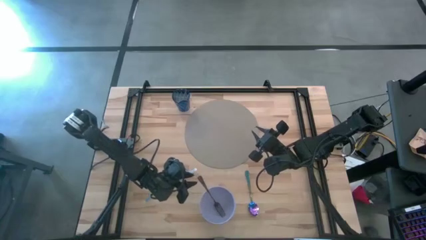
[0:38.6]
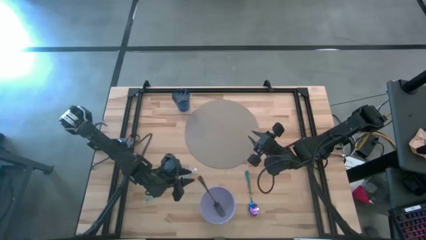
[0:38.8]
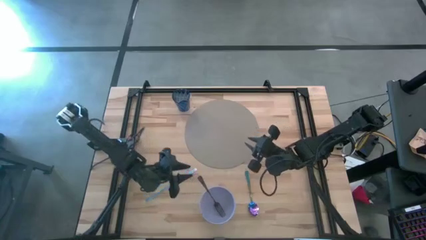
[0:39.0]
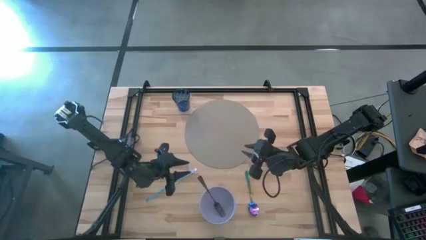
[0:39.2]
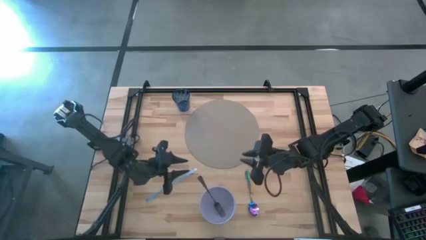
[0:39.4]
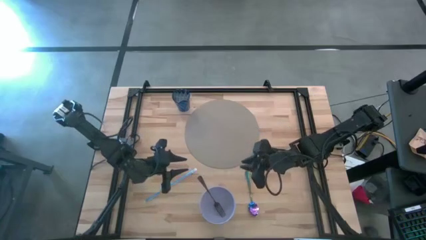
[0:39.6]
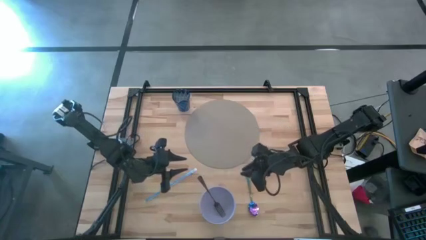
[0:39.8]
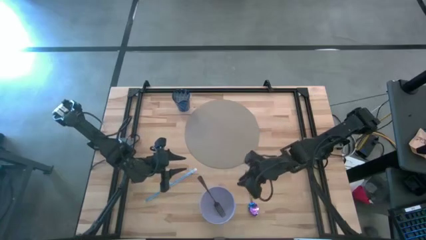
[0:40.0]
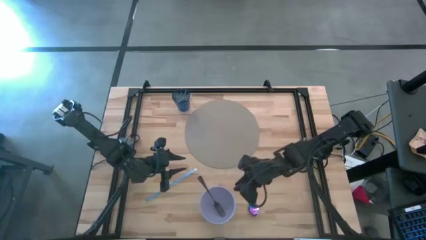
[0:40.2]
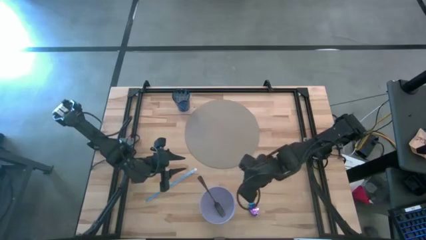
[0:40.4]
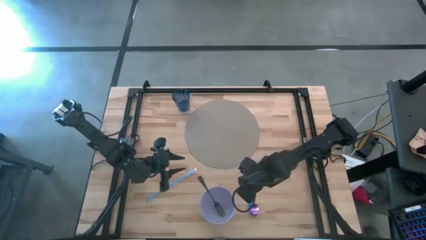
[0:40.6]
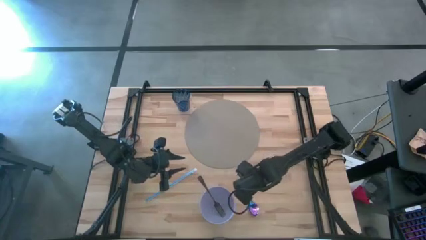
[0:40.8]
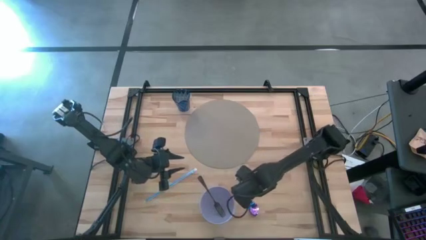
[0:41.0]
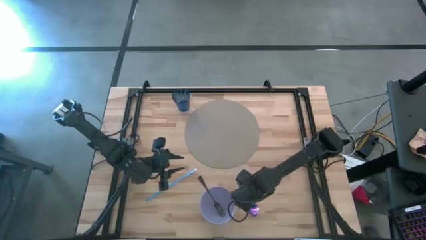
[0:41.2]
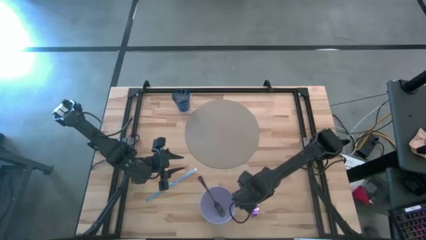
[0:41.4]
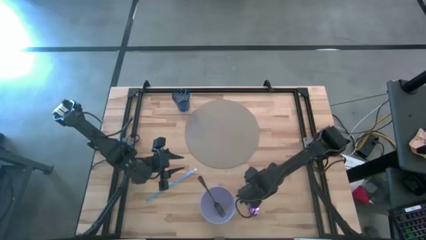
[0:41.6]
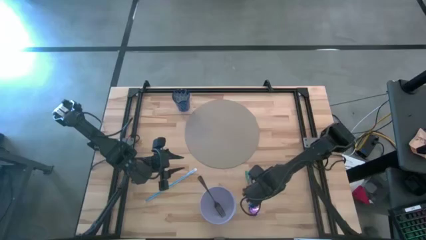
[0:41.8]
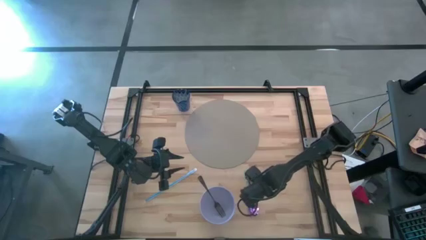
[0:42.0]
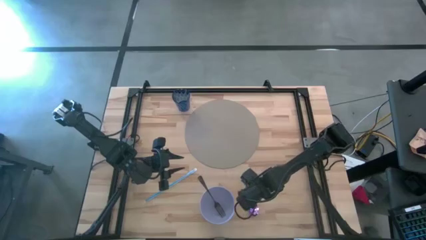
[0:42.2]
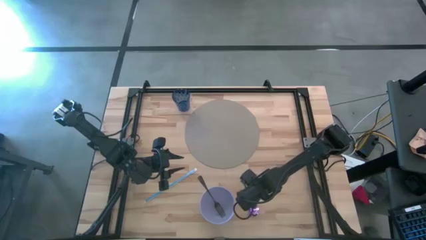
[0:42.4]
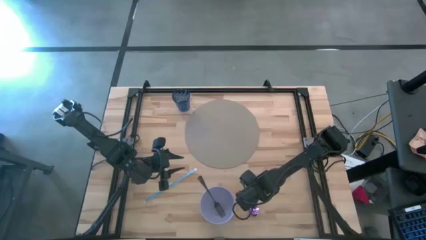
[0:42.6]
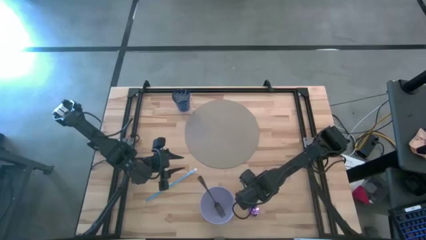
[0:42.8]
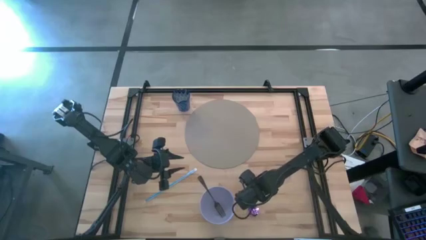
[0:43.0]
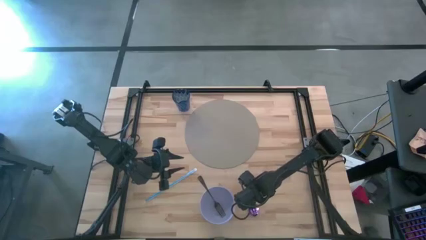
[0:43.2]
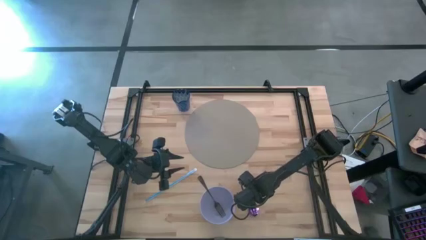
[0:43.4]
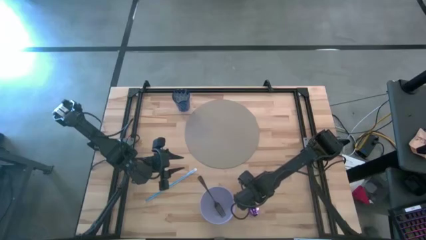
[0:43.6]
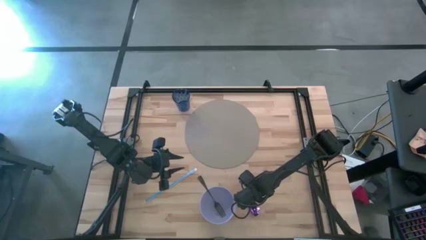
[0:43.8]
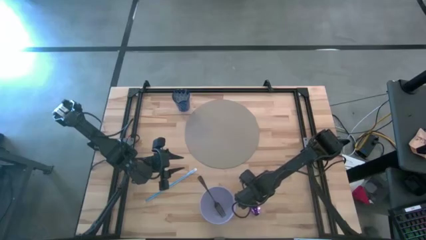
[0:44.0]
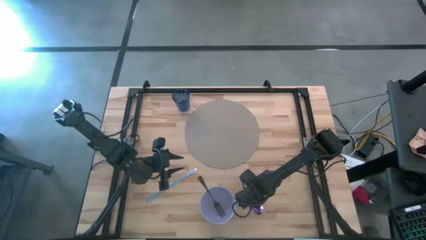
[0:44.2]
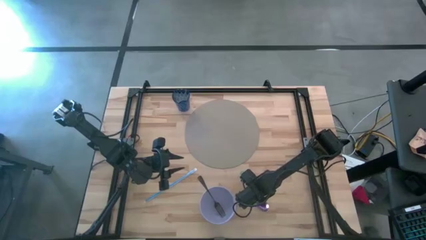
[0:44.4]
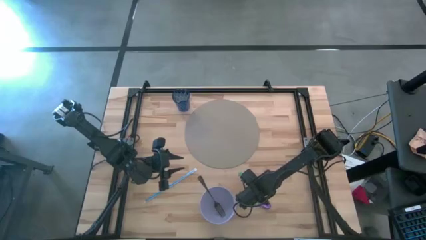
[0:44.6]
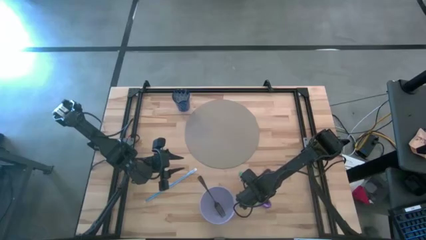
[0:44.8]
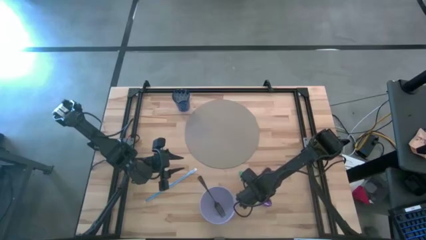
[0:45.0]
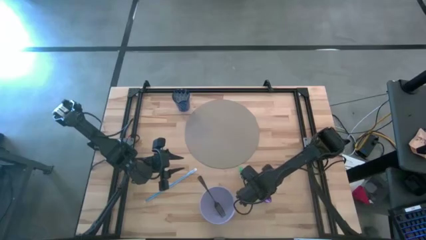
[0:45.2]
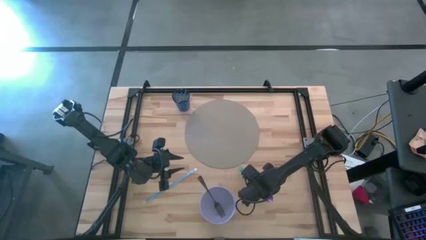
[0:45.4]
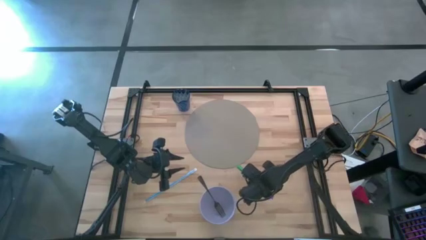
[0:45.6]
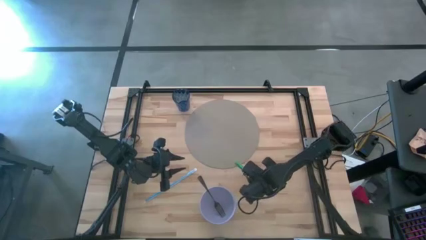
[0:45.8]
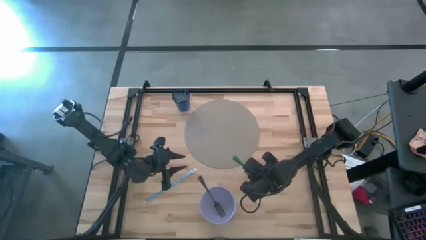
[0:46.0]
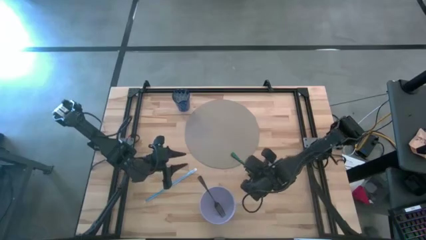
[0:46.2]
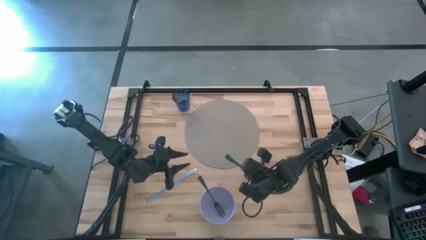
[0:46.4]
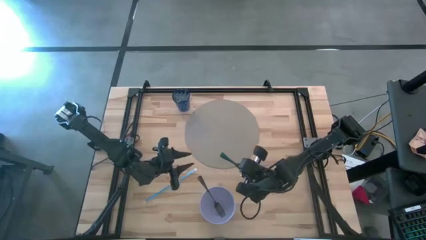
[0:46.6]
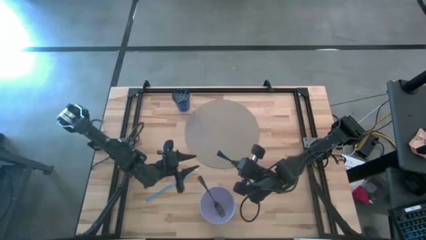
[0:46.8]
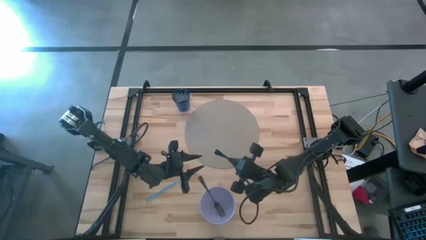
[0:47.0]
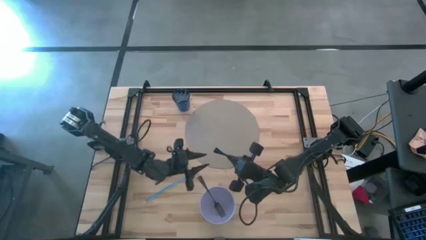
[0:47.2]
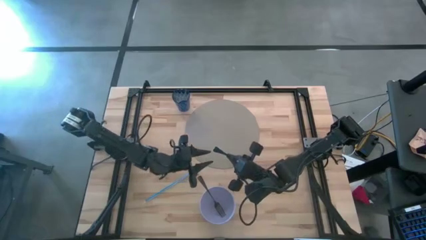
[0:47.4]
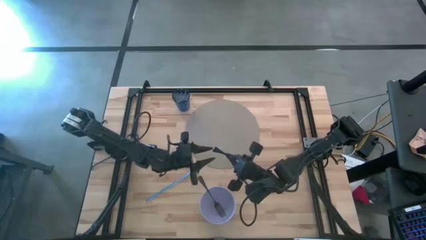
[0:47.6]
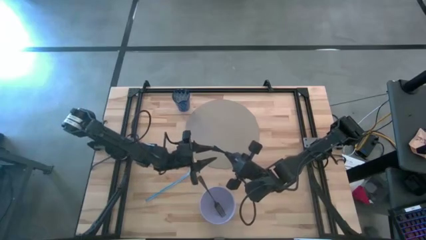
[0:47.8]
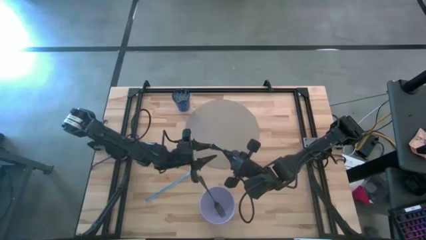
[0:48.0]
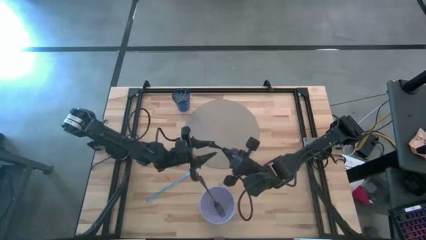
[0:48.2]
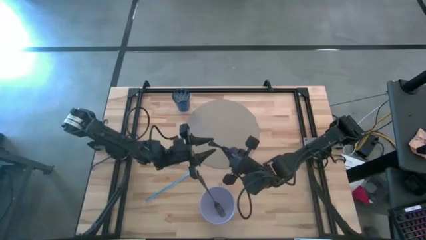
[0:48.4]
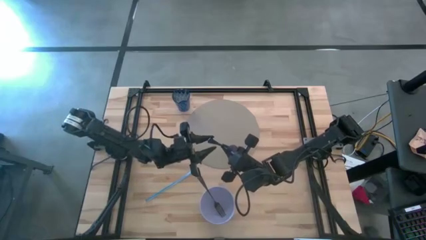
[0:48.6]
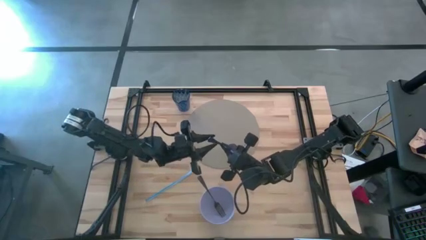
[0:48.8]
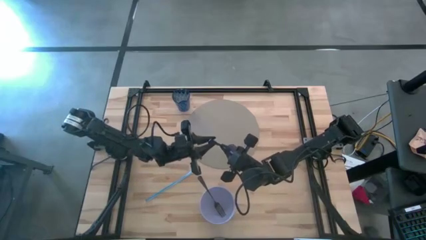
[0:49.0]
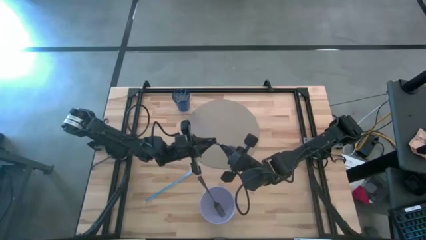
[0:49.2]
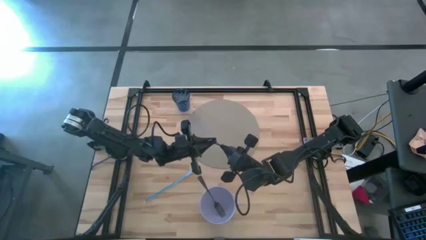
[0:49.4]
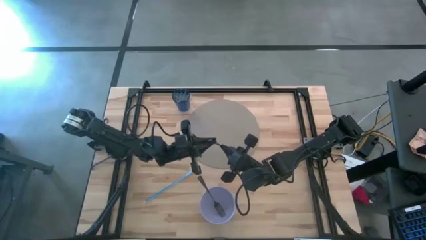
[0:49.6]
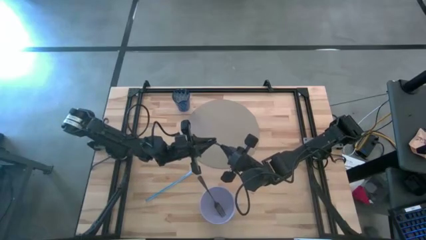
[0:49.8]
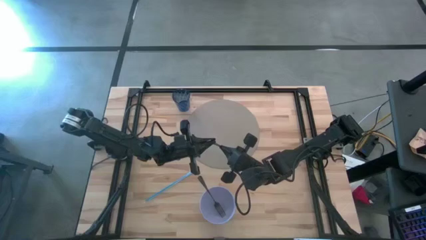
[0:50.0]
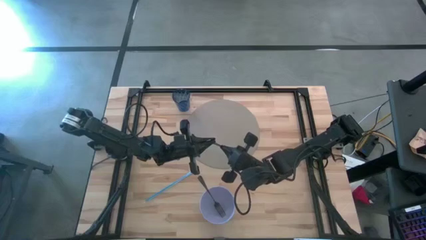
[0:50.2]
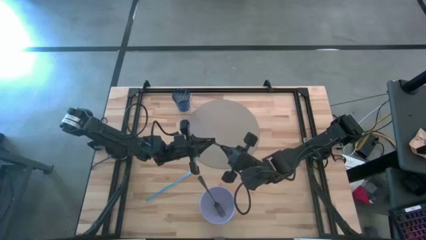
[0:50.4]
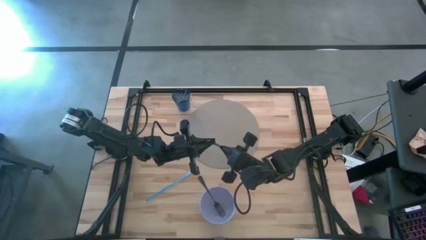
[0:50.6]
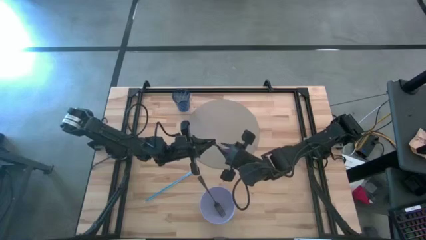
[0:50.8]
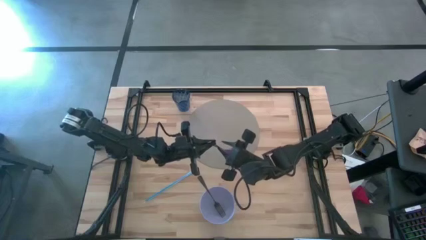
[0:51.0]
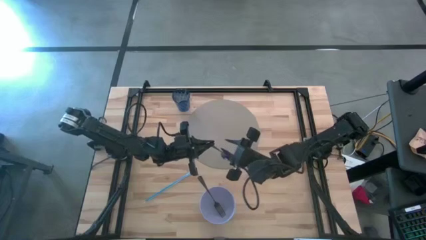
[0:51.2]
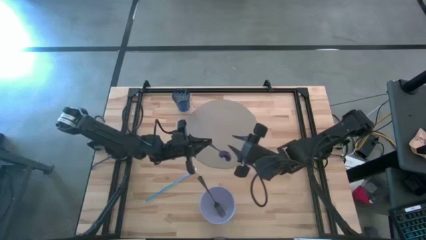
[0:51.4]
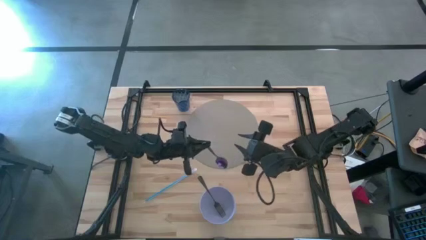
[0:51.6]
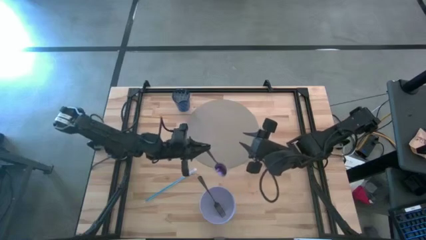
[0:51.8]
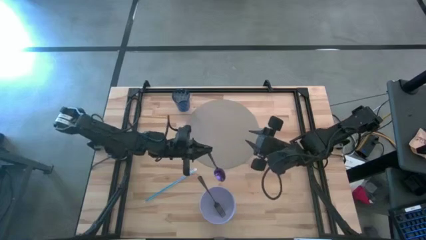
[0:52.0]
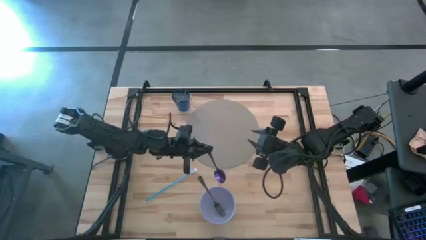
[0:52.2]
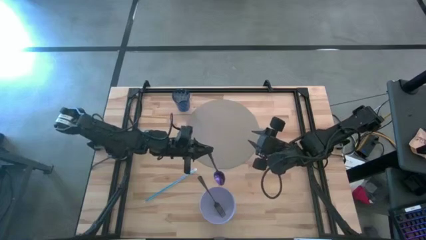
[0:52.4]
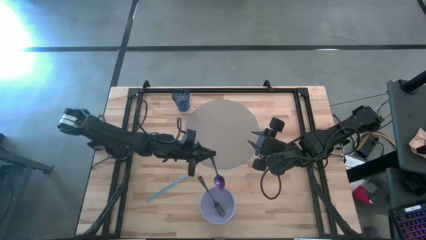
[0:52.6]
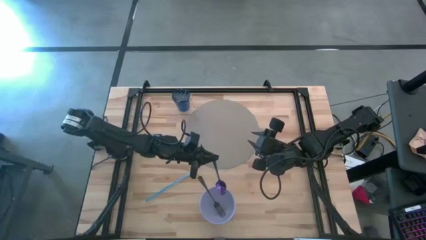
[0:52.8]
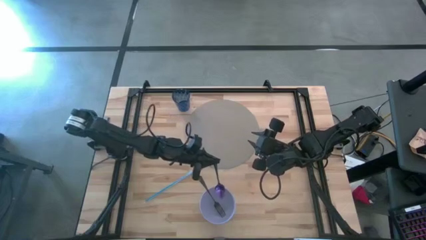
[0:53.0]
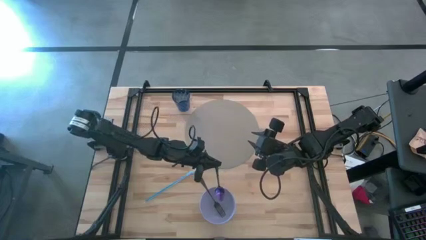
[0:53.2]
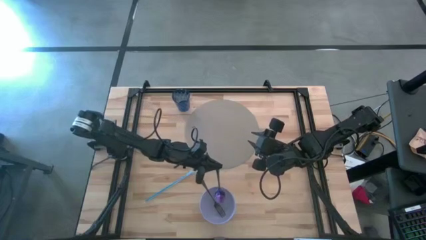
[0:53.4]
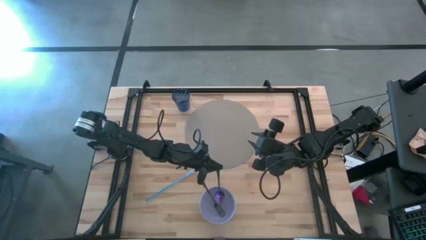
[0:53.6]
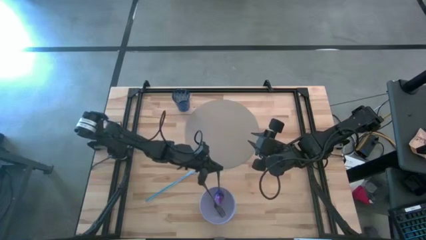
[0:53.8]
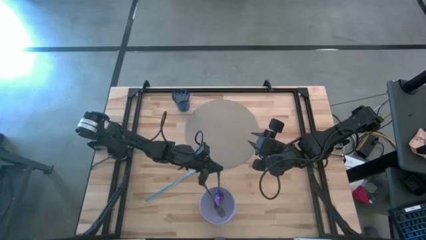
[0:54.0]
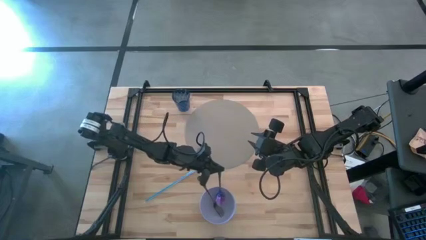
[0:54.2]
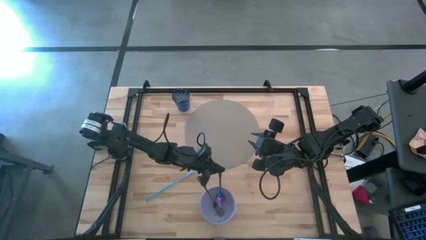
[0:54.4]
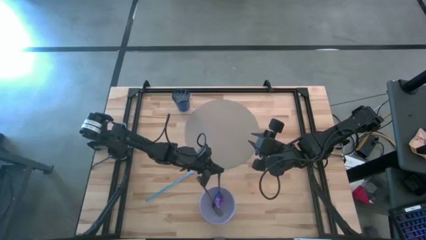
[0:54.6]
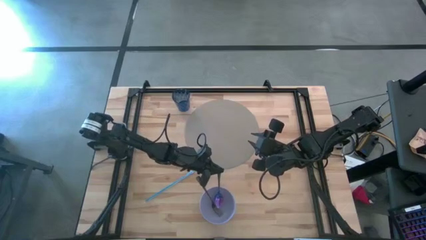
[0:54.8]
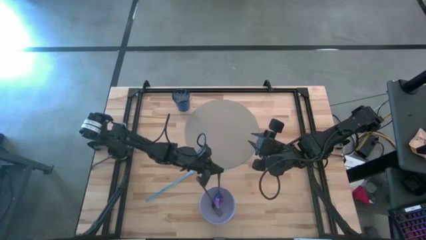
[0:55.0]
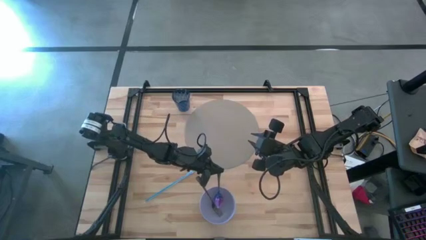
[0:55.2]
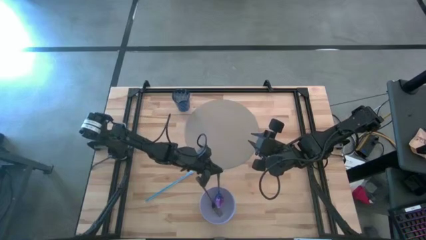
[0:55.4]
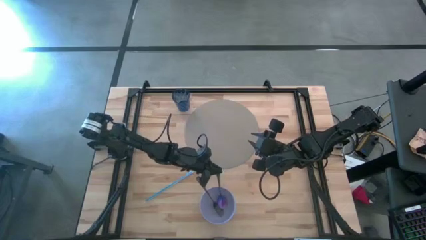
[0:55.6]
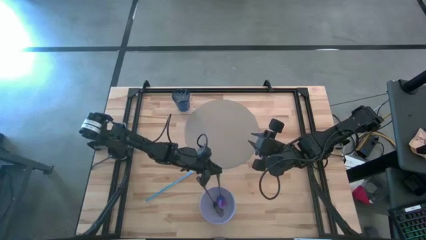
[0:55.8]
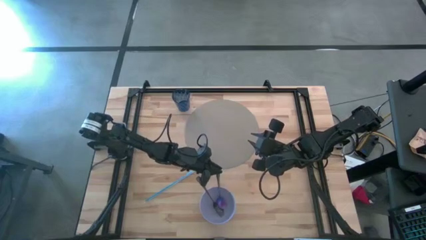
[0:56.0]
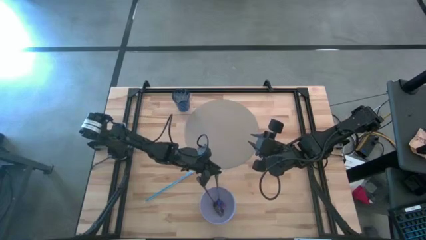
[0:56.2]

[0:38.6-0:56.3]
Task: Pick & Place Utensil
Put the blue spoon into the purple bowl
